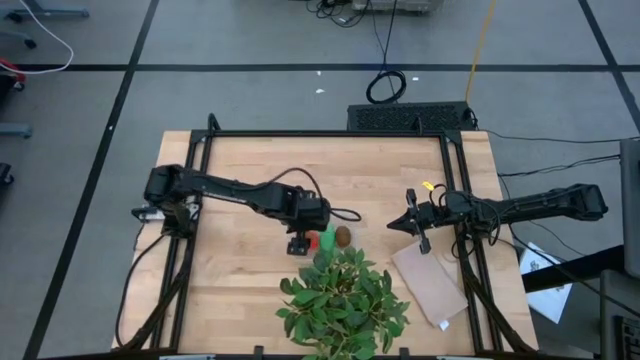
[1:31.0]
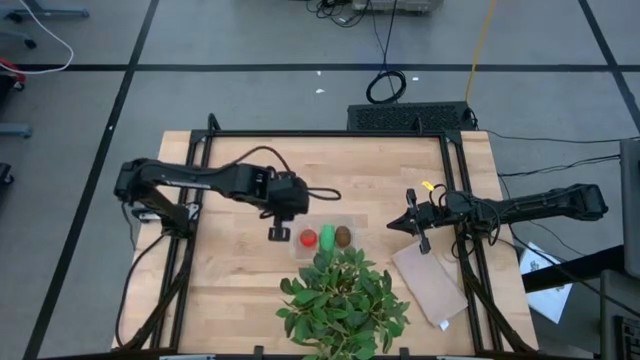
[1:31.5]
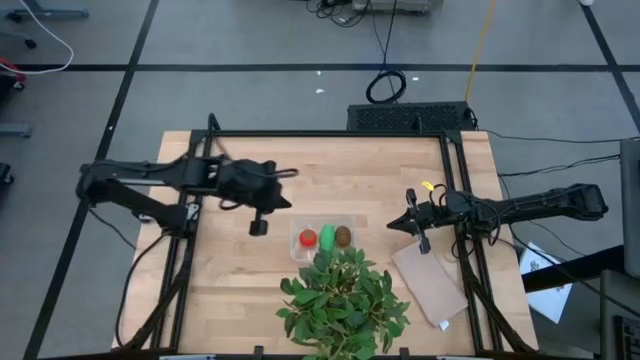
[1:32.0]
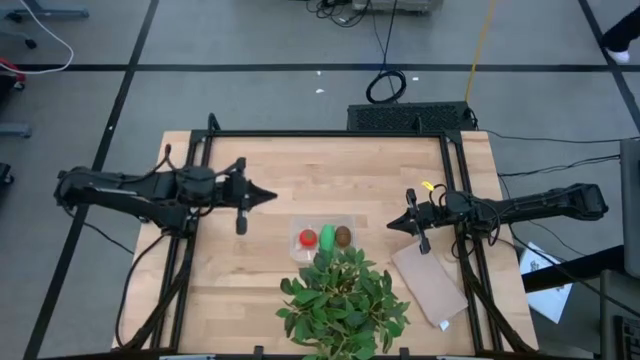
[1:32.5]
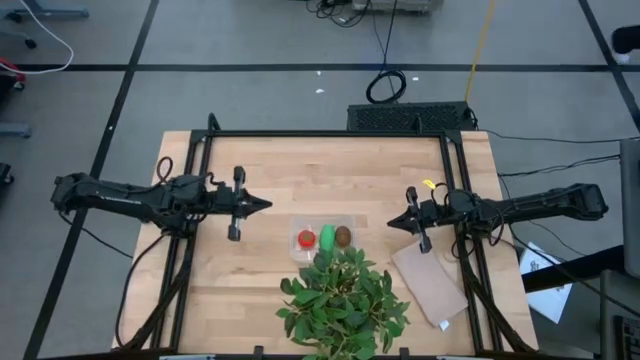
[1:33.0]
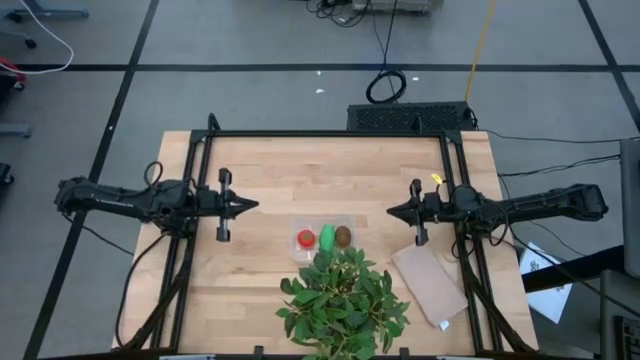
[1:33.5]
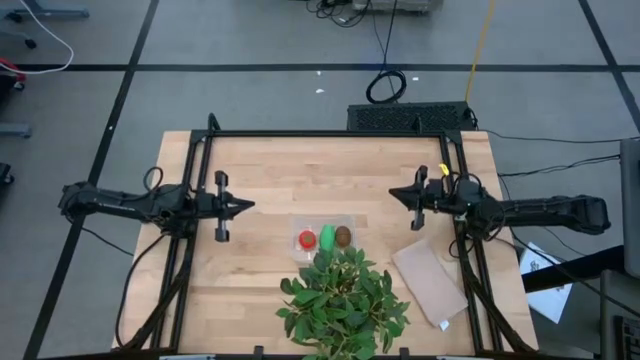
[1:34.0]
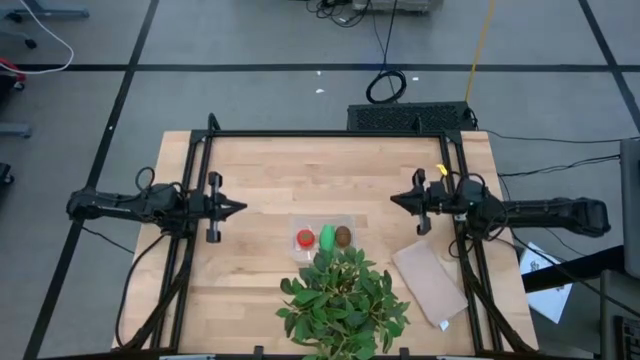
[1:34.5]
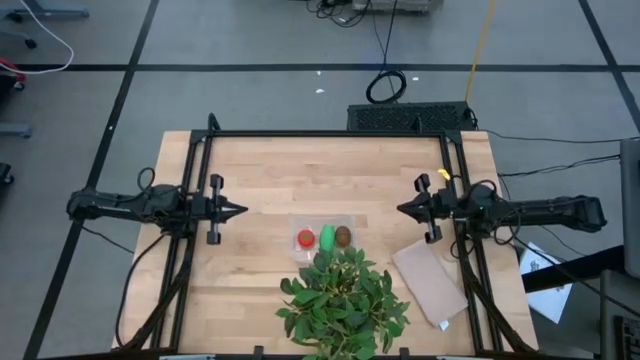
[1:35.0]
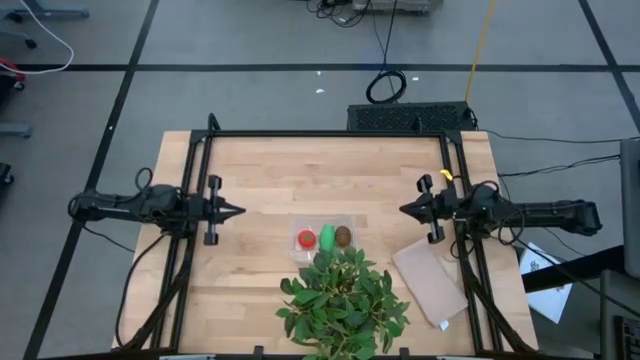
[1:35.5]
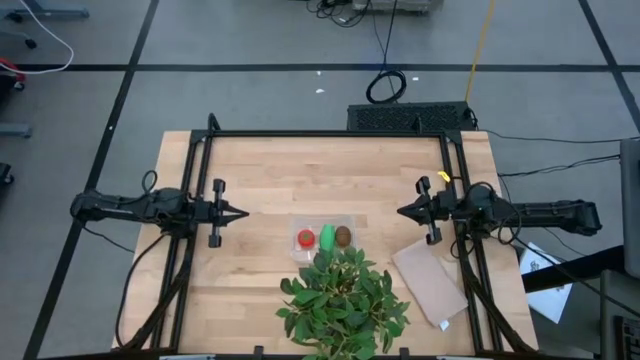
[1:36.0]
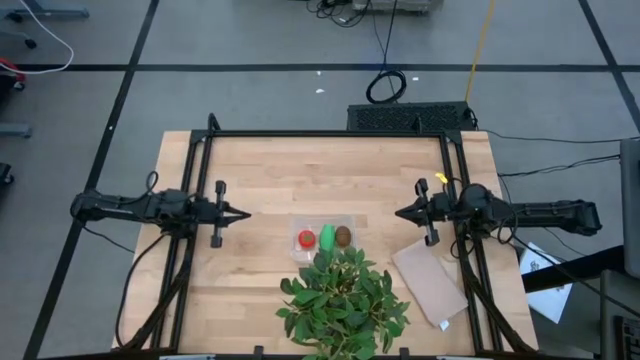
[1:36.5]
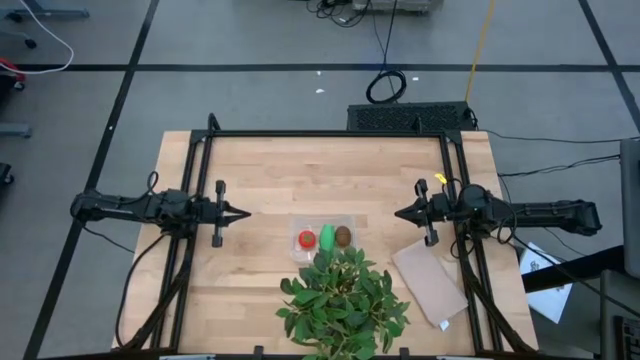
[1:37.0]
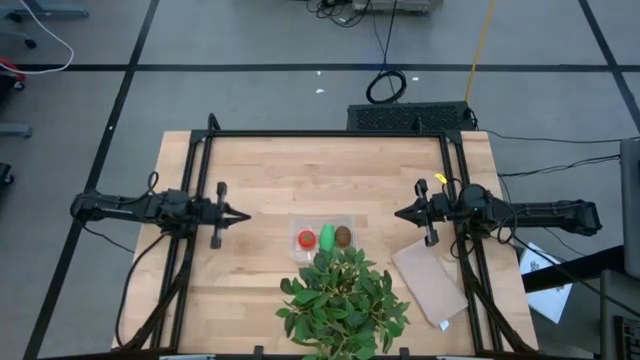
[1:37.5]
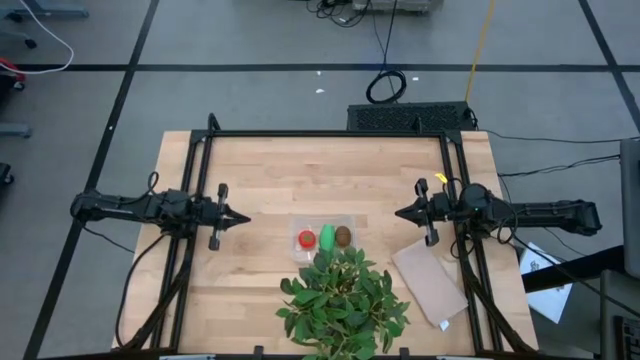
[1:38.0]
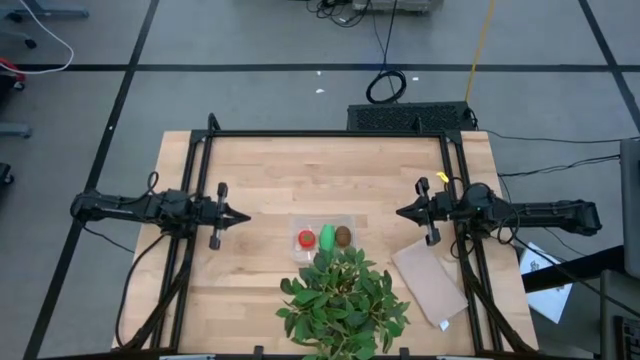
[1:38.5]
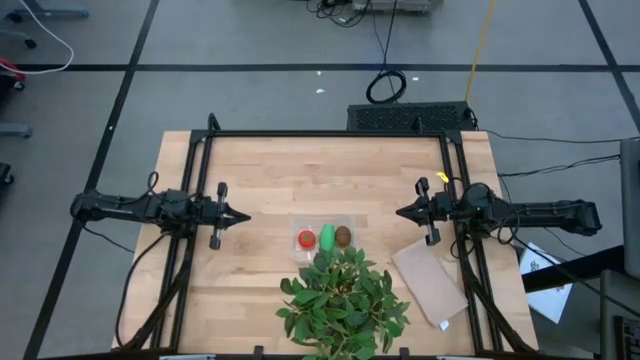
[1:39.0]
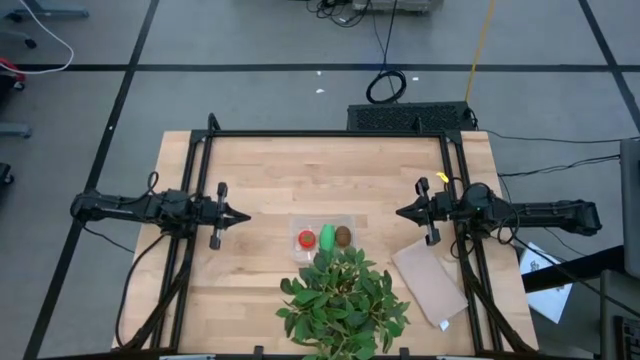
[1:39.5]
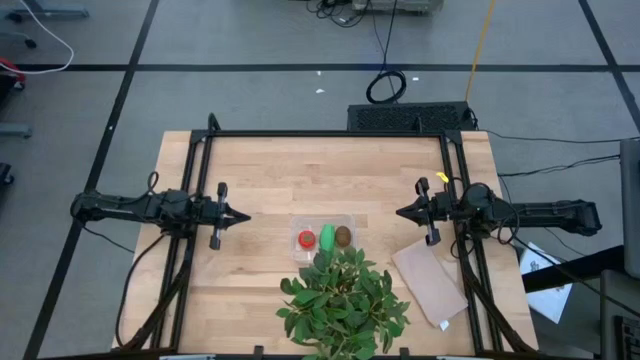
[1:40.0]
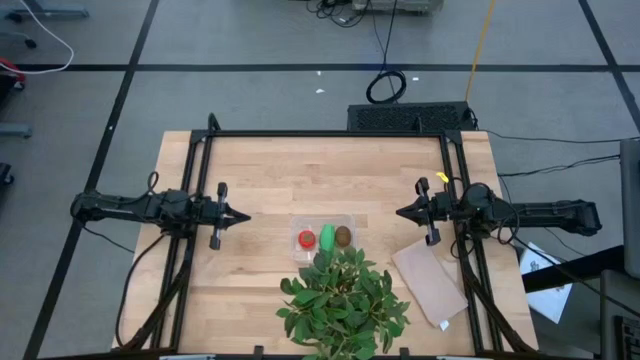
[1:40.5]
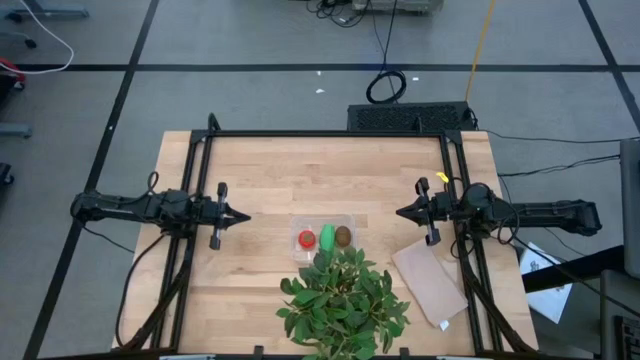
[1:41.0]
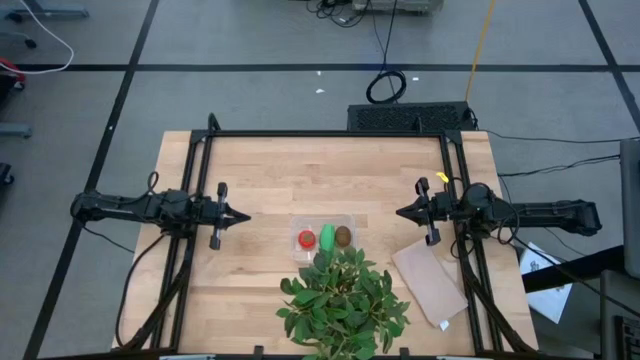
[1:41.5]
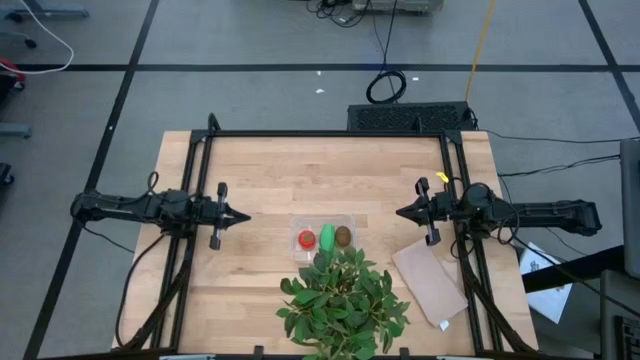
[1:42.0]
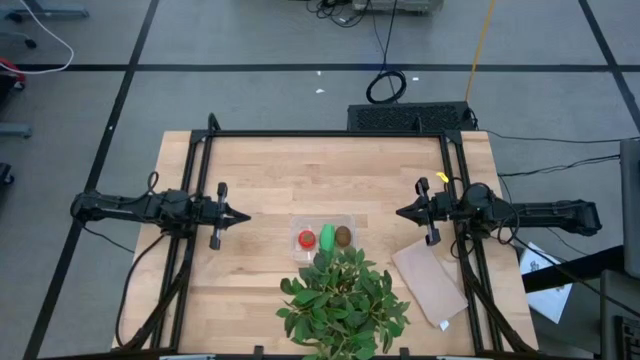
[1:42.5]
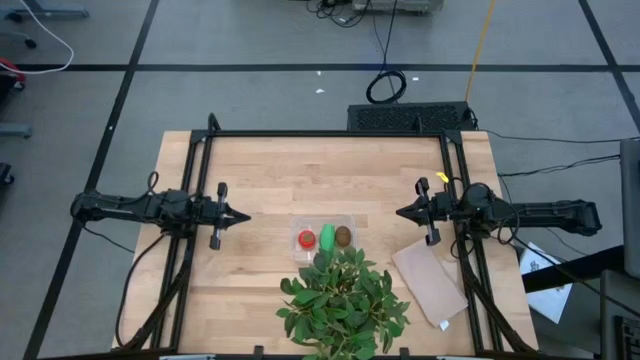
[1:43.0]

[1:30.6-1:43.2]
Task: Pick and placing Produce into tupperware
Return to Home Position

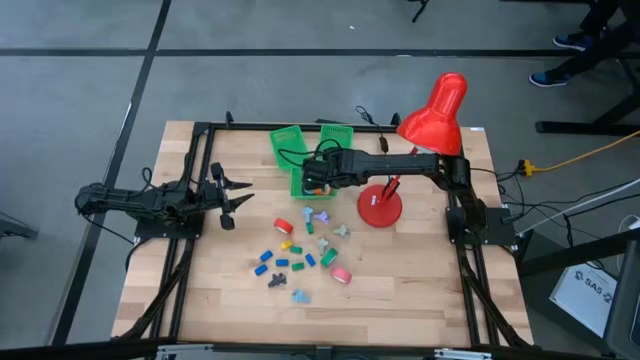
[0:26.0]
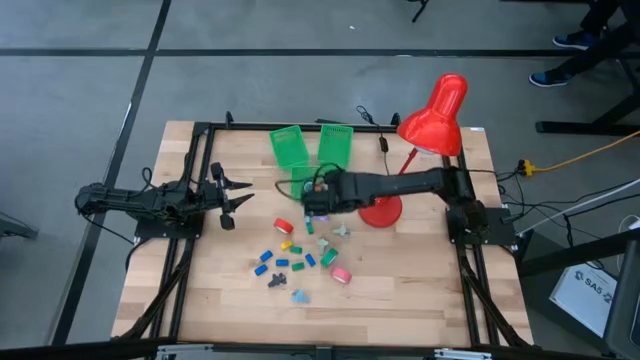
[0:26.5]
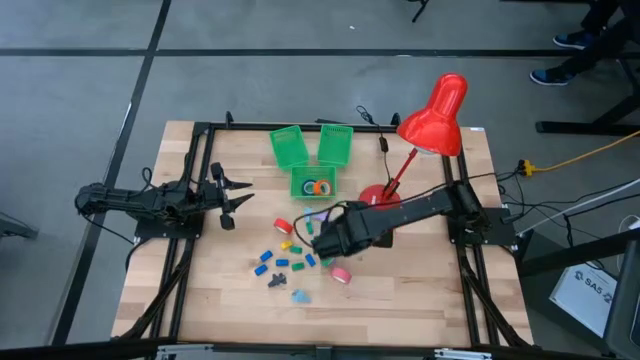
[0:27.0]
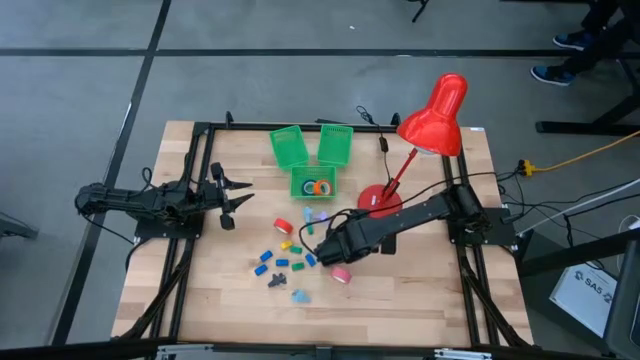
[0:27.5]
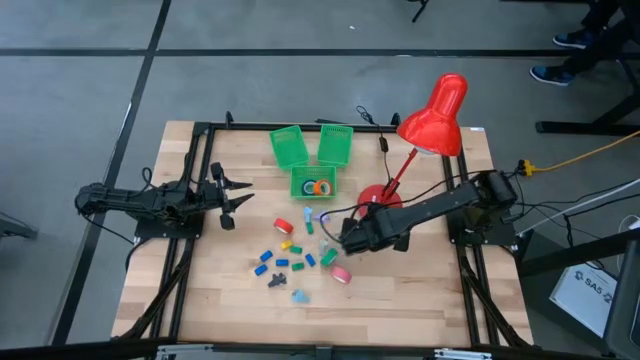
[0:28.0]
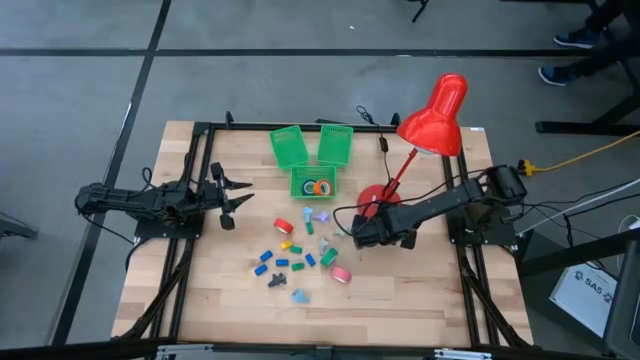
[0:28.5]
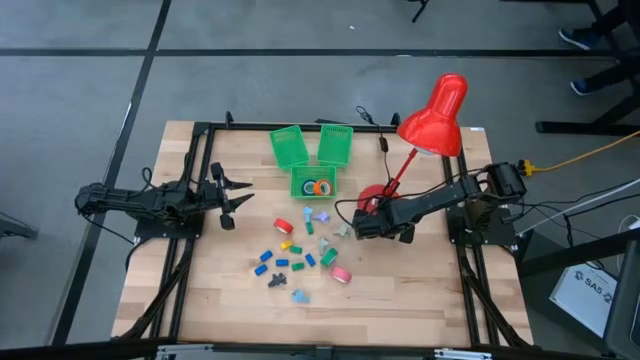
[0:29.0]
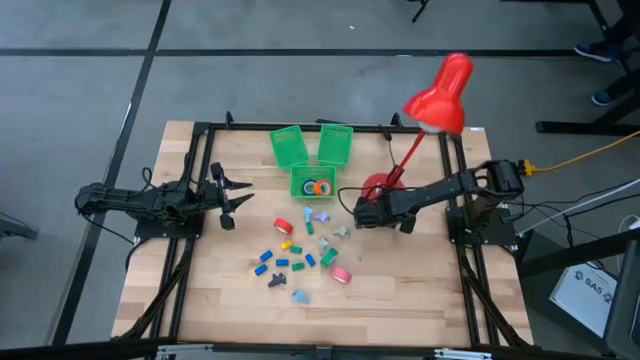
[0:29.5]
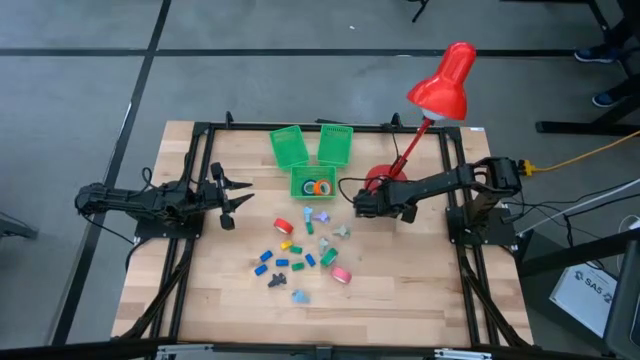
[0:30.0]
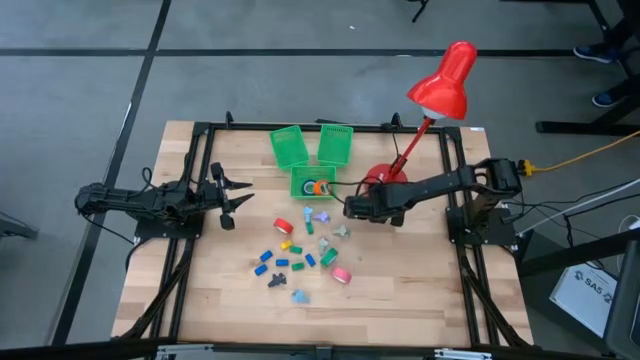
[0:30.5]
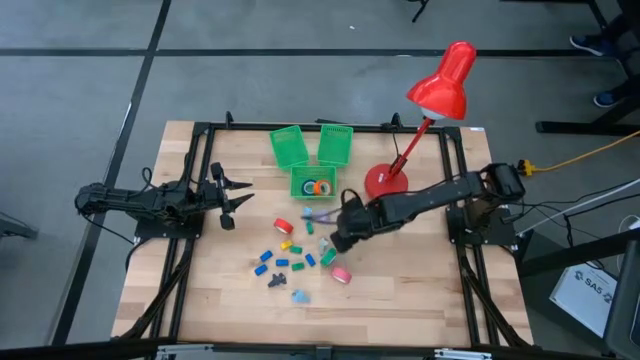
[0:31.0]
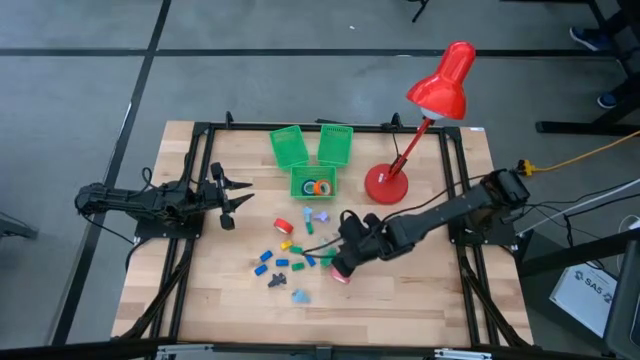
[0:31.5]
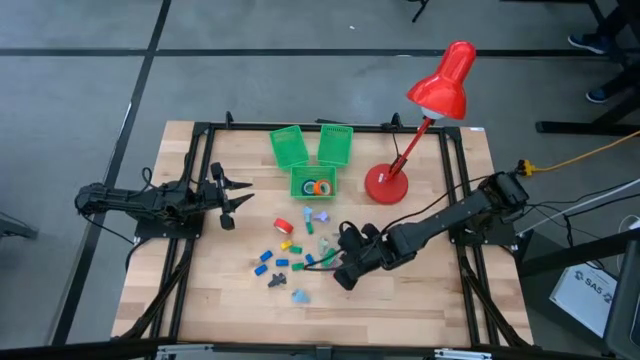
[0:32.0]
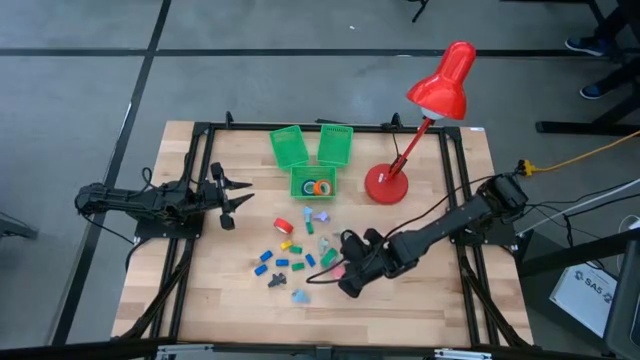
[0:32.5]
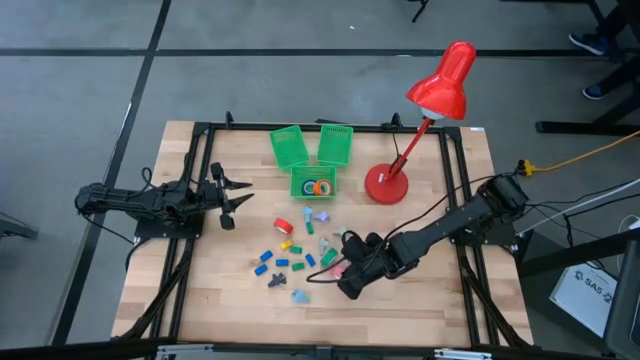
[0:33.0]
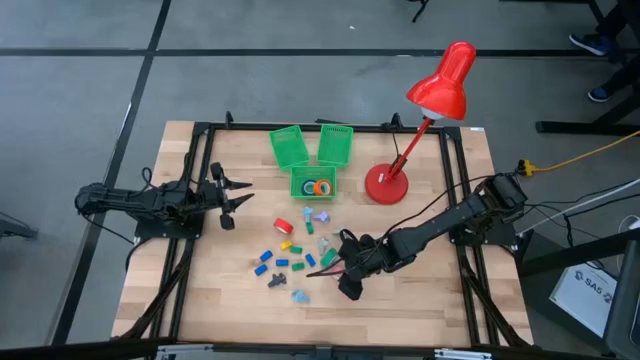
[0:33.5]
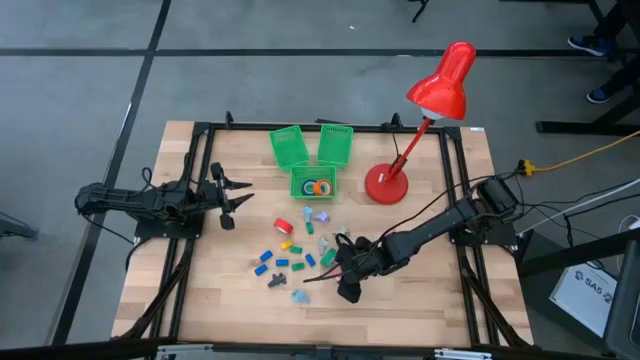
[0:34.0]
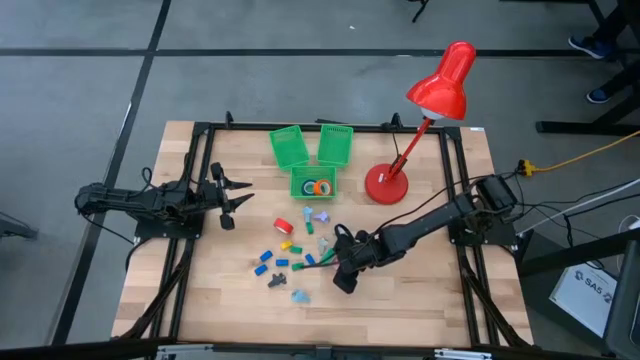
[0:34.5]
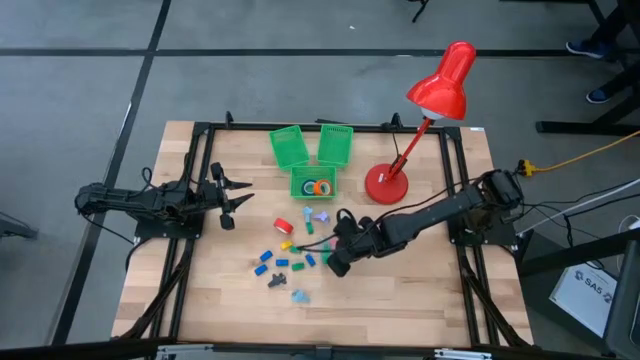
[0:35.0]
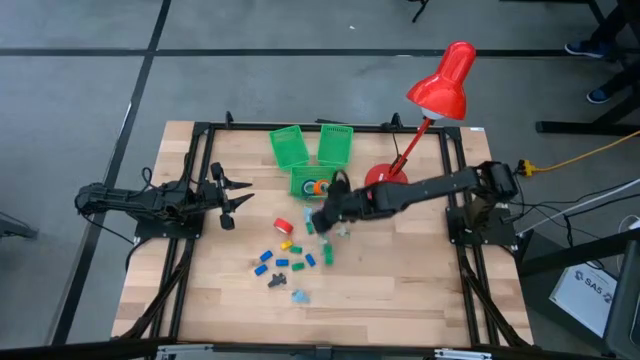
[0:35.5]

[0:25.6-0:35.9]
Task: Pick and place Stapler, Stapler remover, tape
Put the pink tape into the middle green bin
